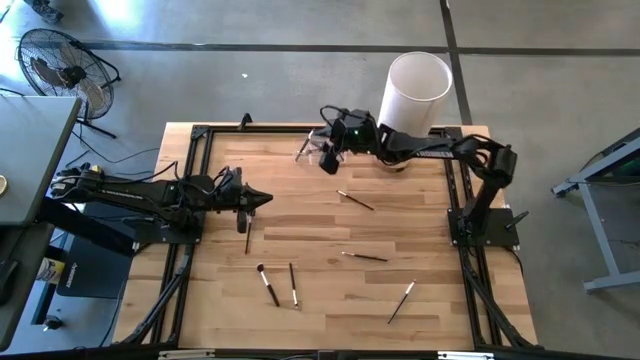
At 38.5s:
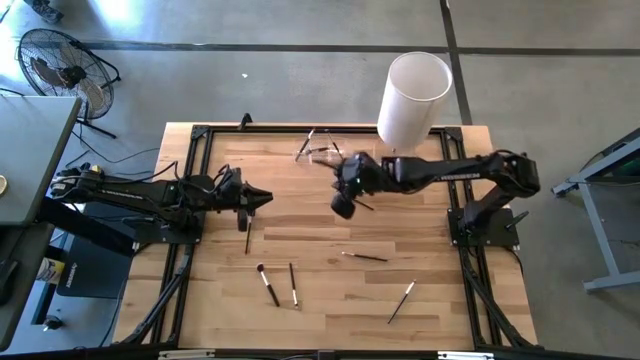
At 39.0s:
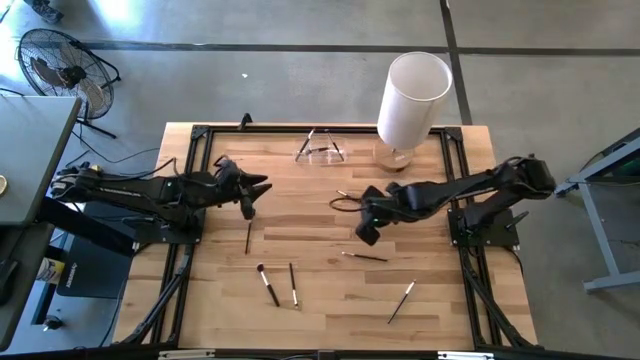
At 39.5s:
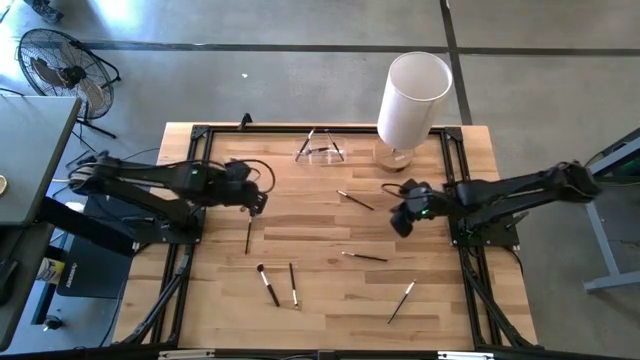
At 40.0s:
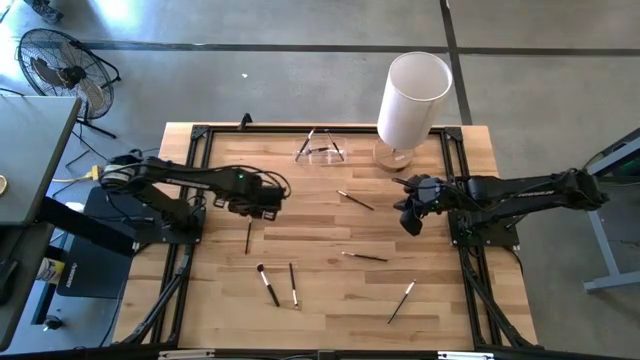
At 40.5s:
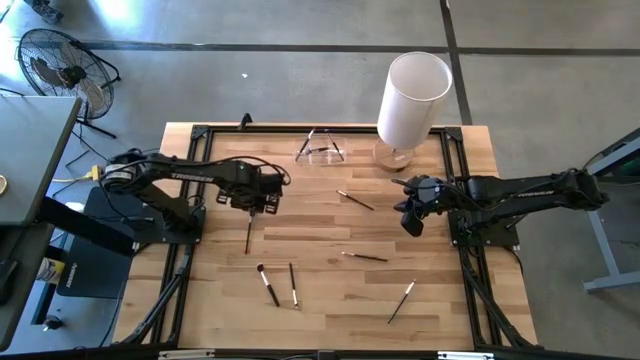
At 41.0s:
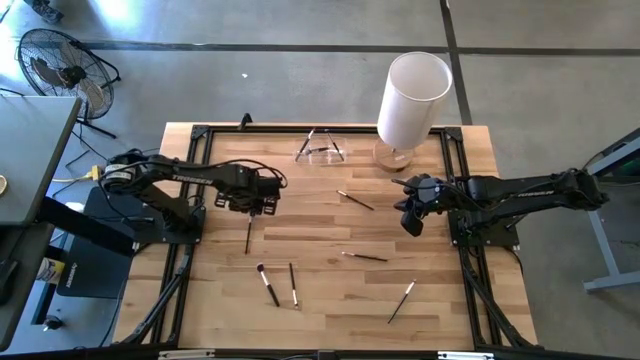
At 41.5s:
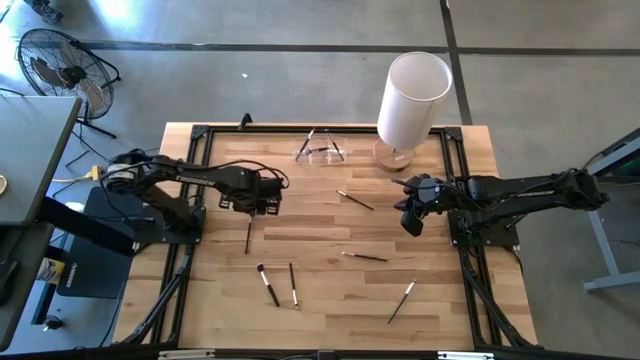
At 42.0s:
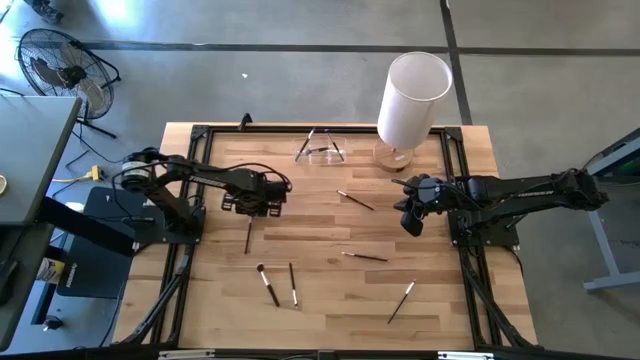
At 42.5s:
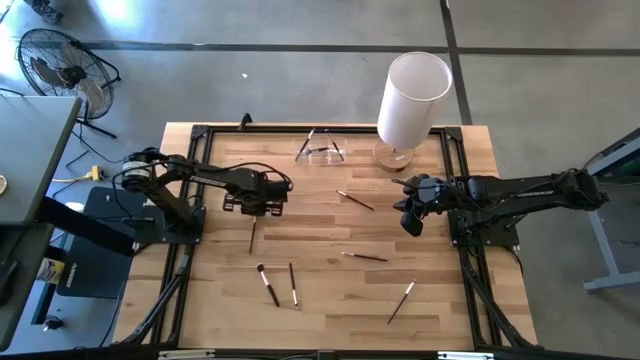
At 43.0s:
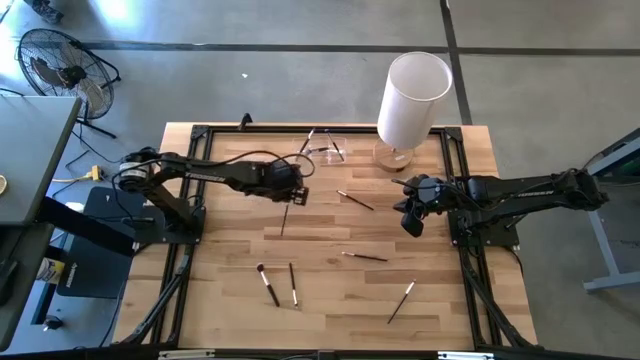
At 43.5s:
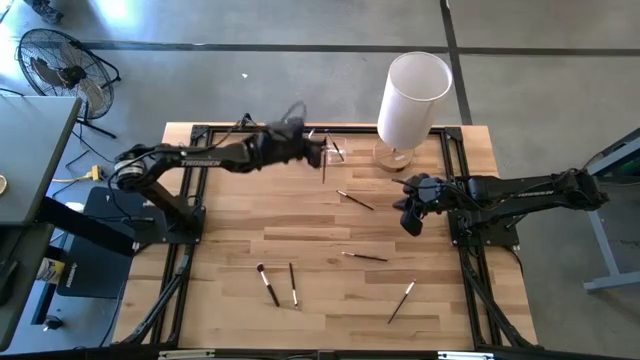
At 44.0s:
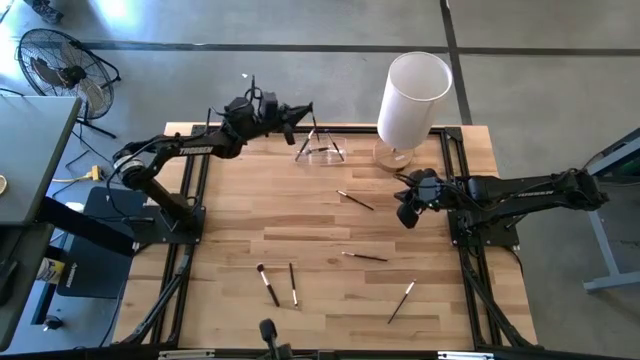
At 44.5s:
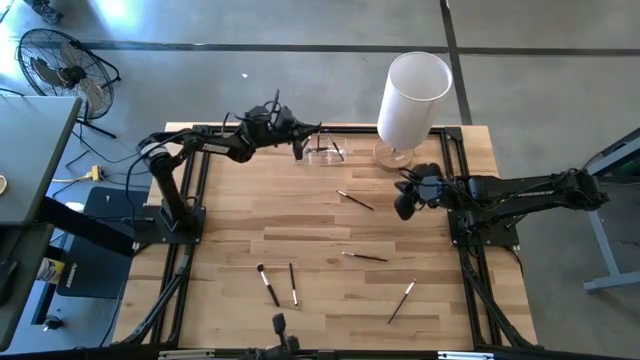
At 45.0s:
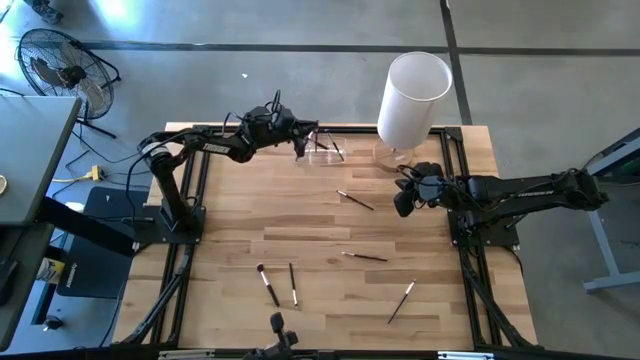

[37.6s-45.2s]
Task: Put items in baskets/containers
Put the black eye groomer brush into the transparent organizer

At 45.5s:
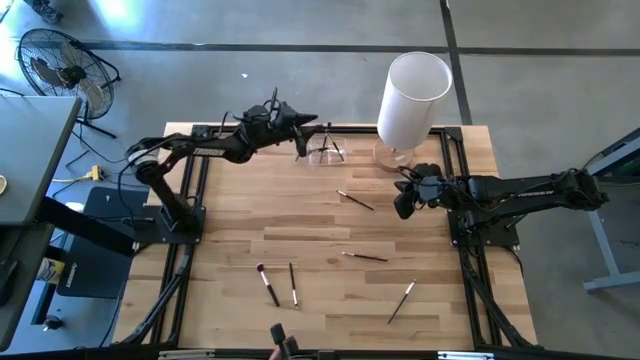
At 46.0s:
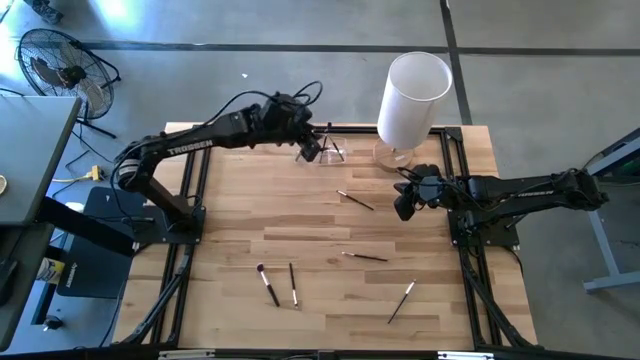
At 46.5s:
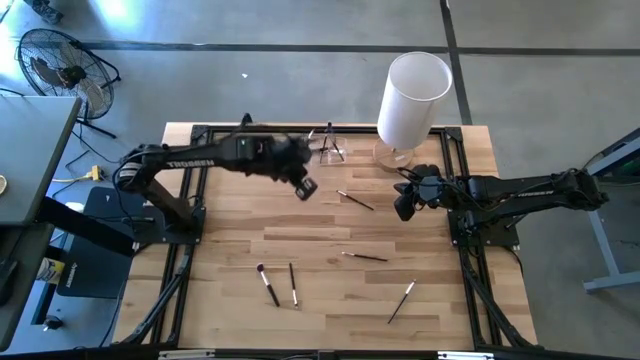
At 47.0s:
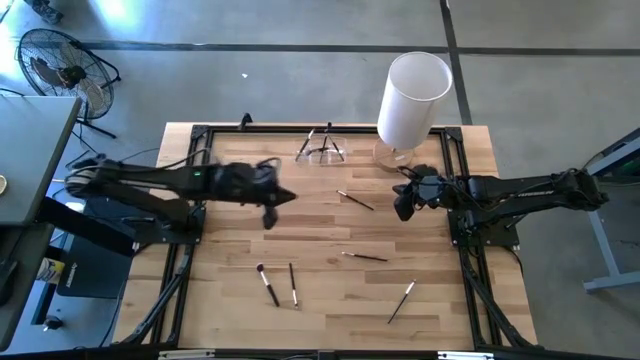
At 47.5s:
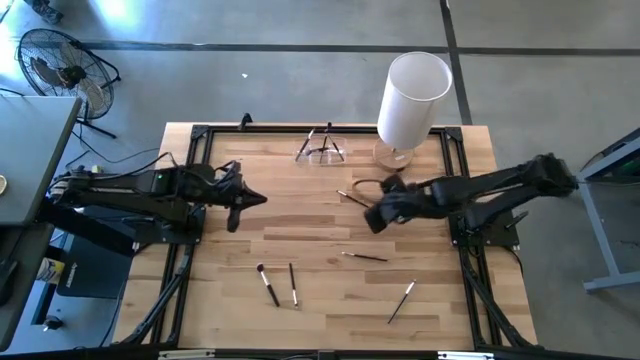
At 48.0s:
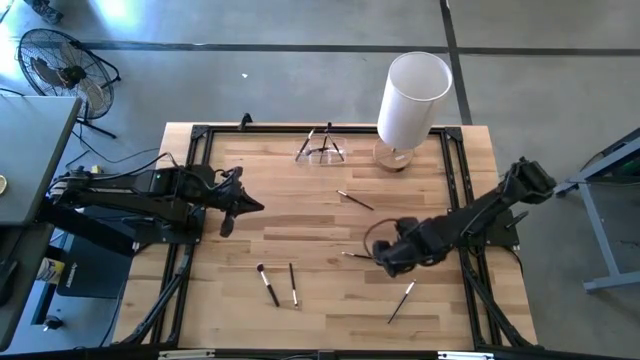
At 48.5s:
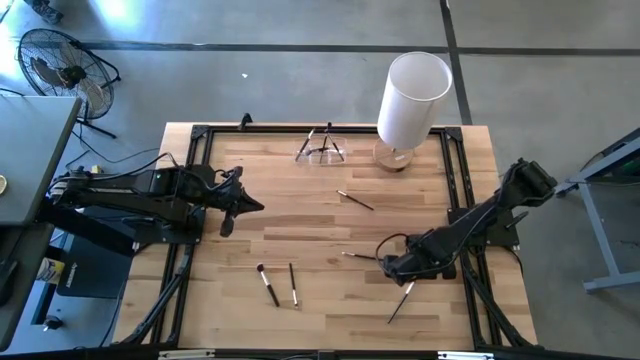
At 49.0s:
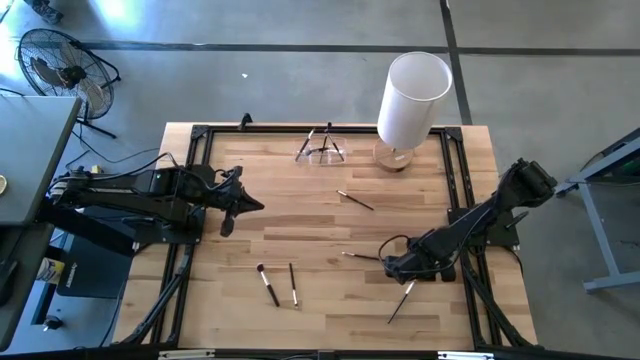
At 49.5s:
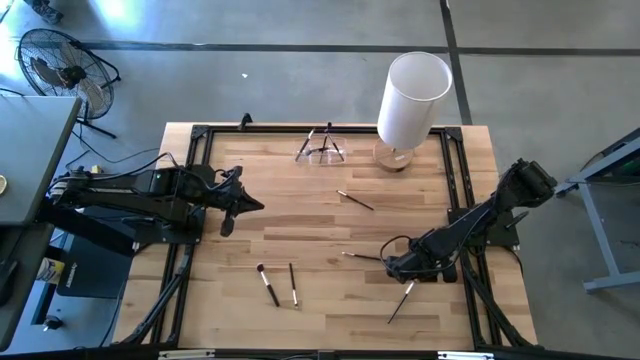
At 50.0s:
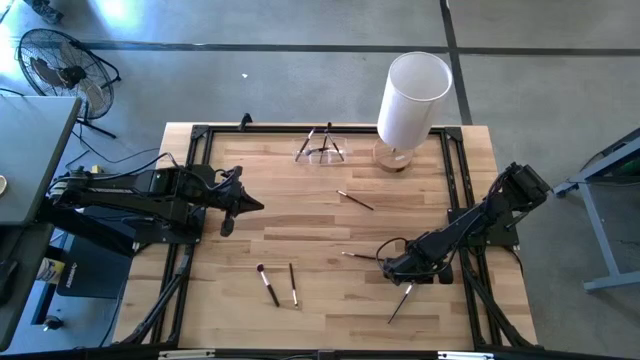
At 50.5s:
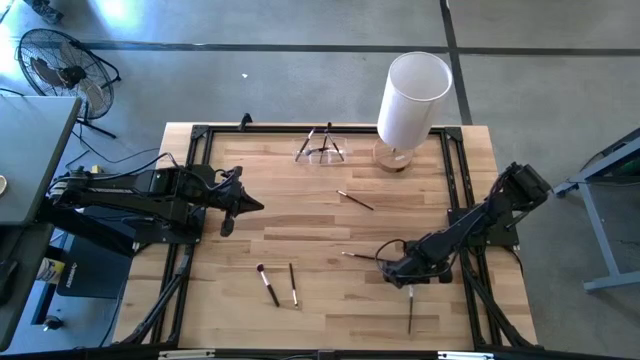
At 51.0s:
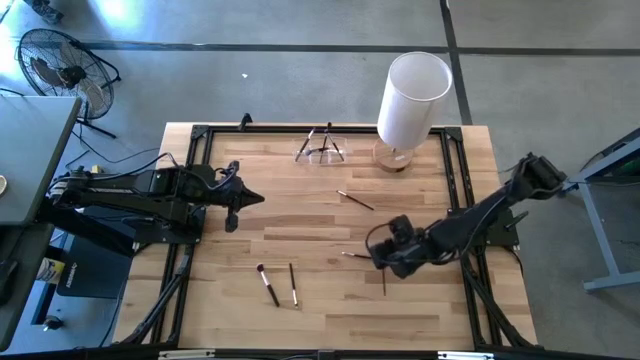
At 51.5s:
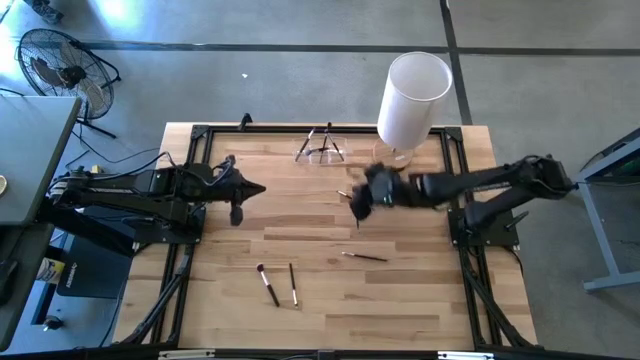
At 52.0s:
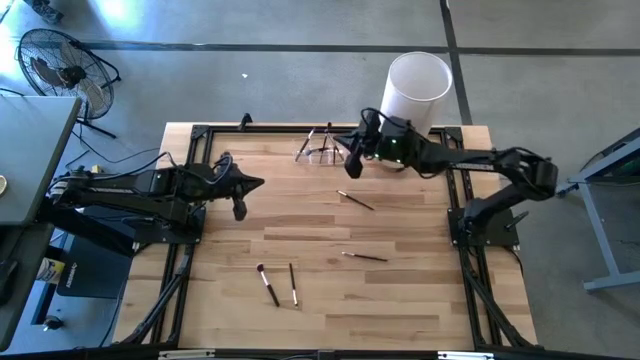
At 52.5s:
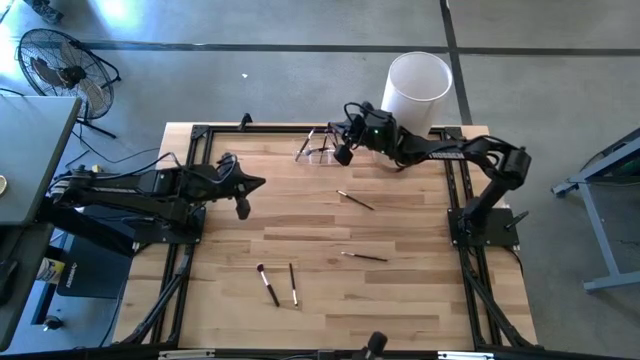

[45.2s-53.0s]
Put the black eyeshadow brush into the transparent organizer

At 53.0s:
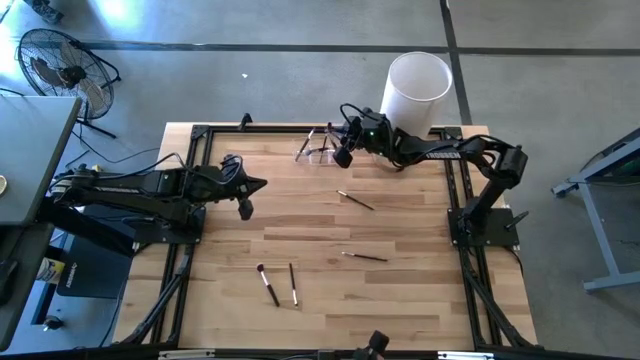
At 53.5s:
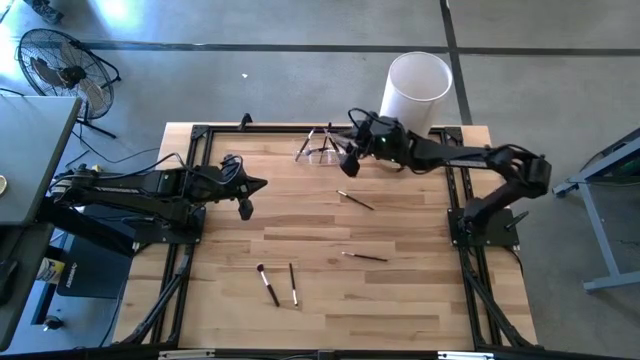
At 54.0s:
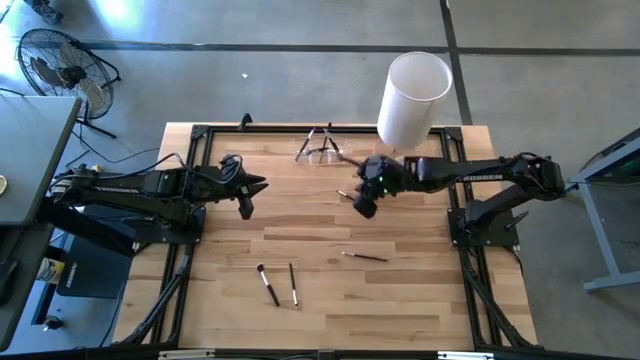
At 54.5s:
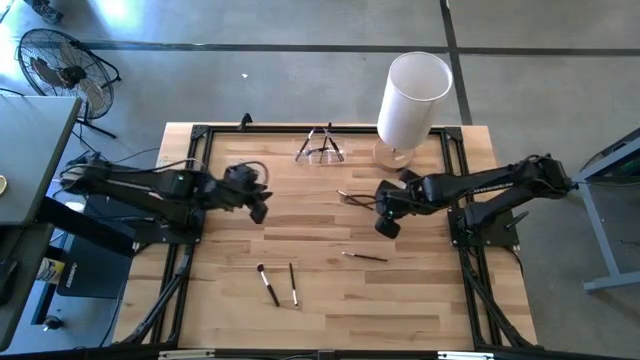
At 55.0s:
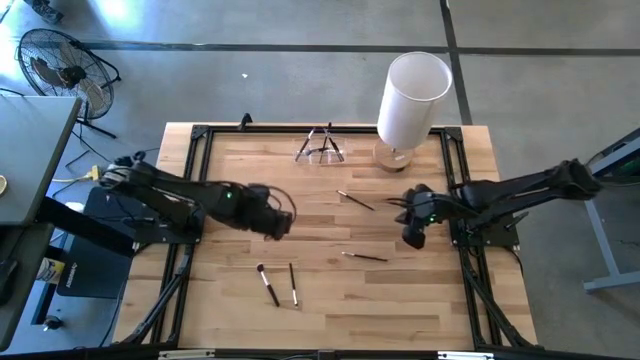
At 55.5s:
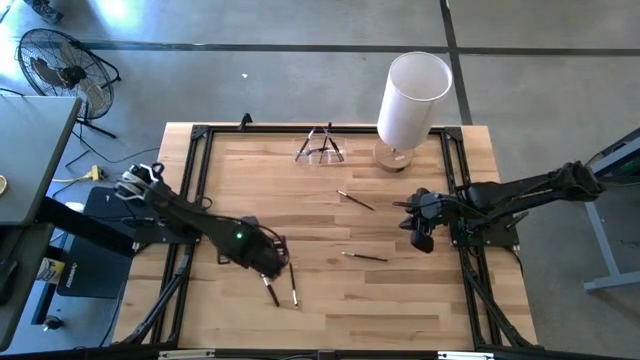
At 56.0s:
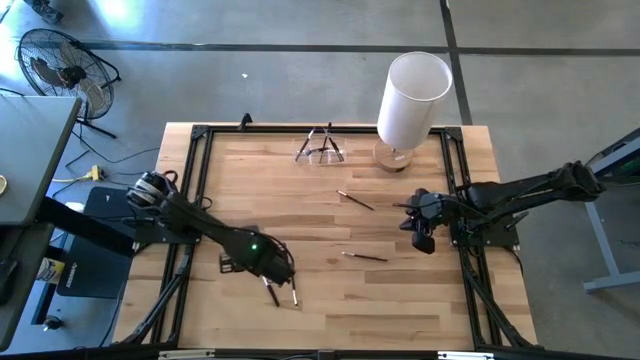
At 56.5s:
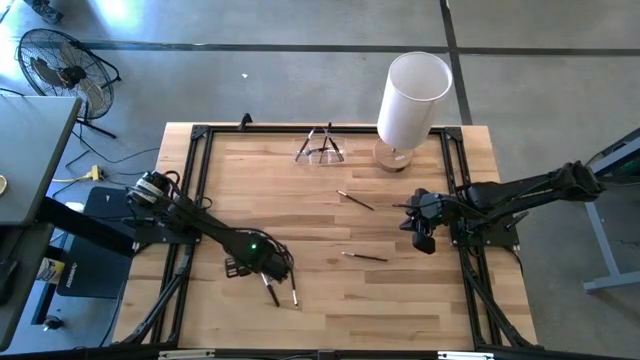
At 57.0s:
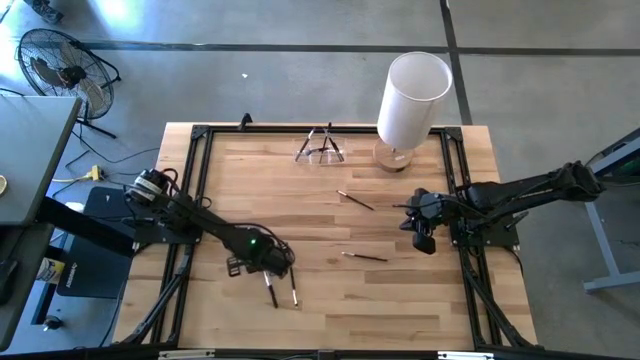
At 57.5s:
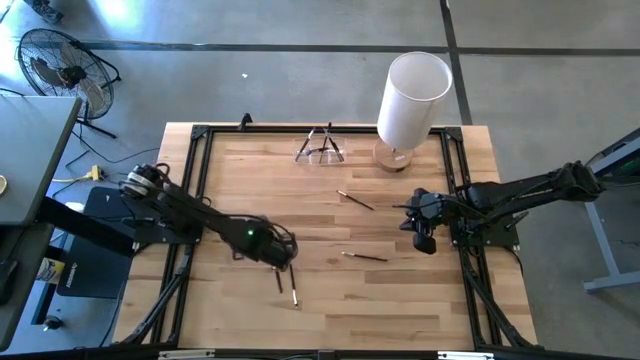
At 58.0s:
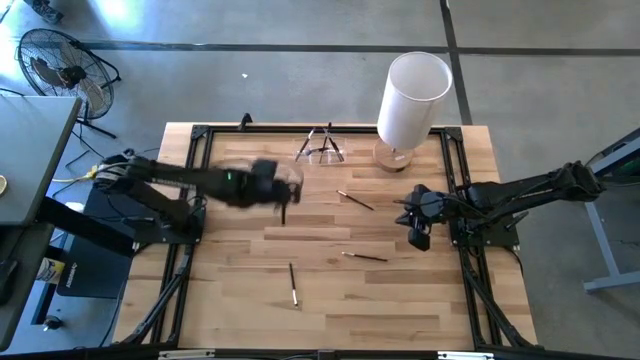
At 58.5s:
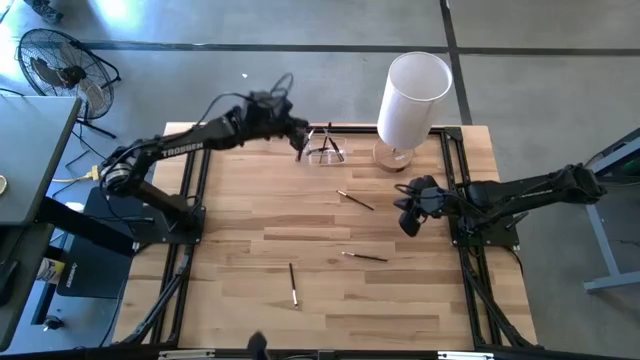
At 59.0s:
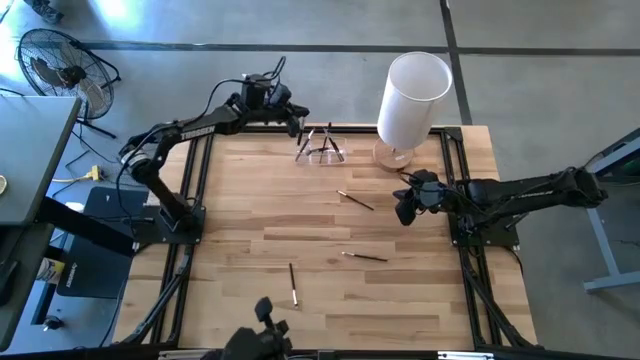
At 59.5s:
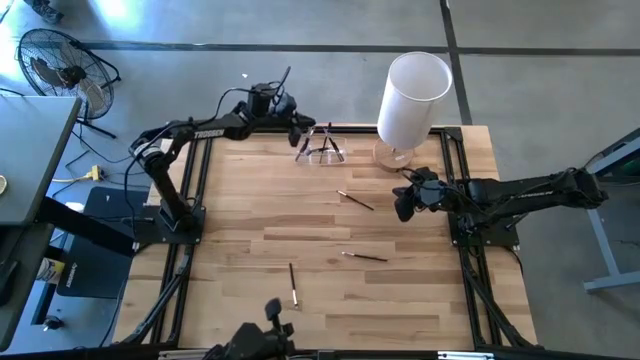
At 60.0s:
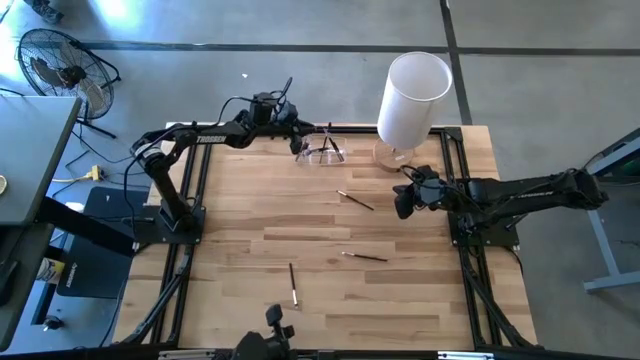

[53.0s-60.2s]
Put the black powder brush into the transparent organizer
